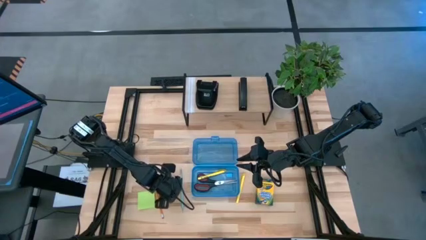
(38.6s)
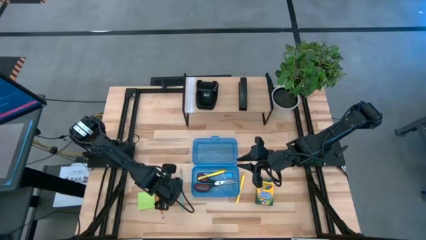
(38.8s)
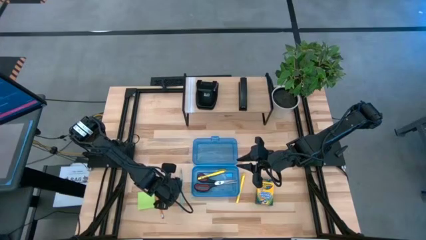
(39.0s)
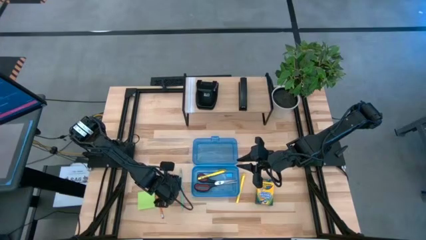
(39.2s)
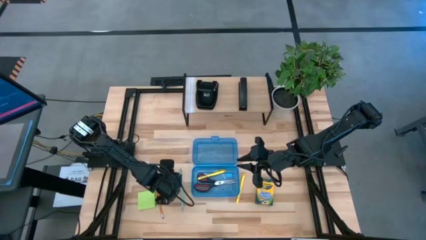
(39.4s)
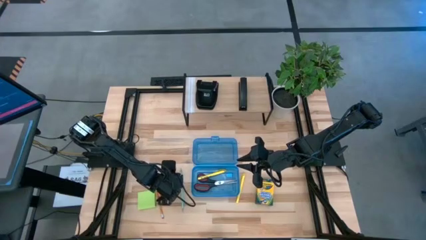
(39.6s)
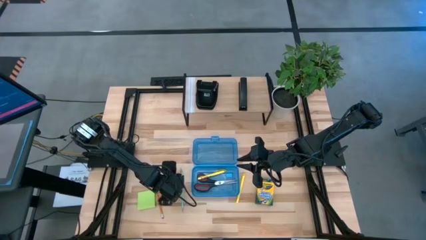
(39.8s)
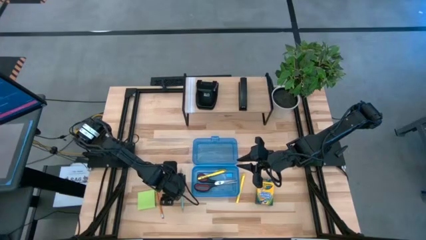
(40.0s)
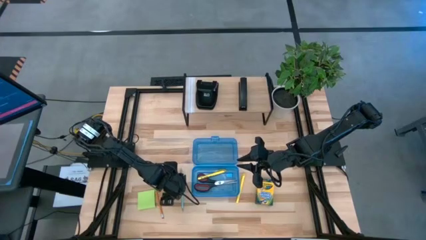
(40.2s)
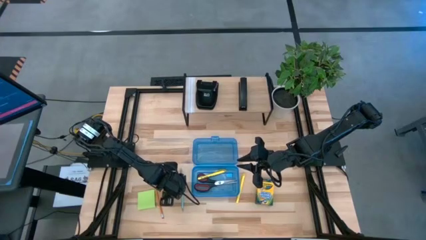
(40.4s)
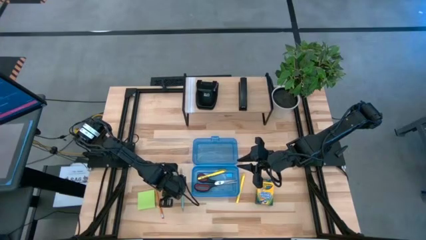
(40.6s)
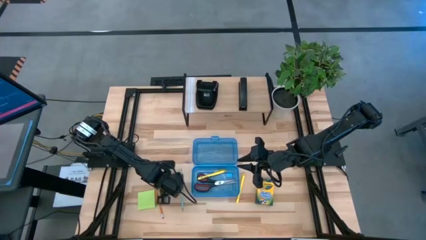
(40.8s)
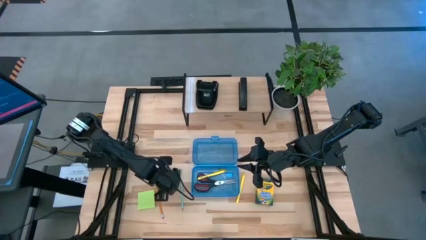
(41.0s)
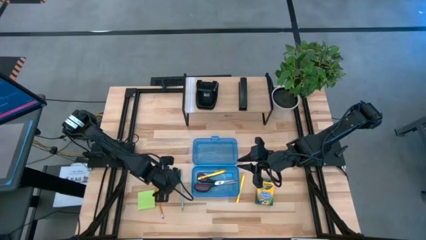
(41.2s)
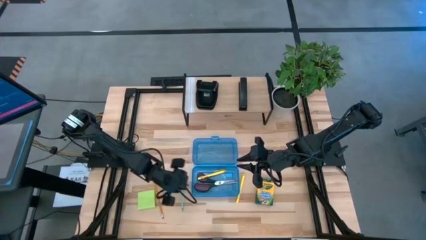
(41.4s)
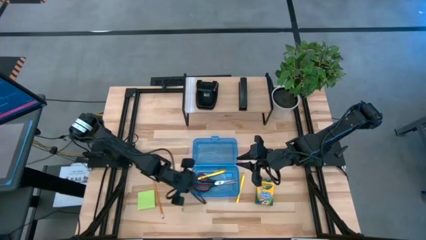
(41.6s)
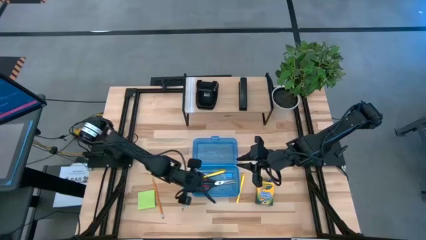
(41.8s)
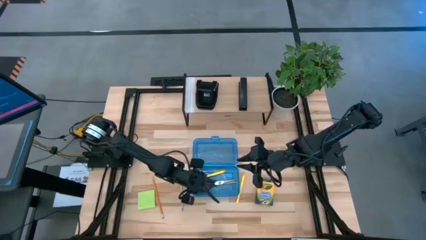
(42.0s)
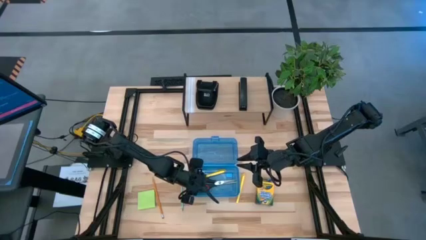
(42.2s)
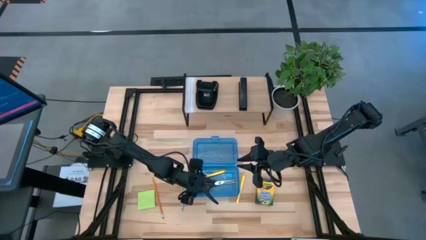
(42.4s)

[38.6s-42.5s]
Task: Pack school essentials
Put the blue eraser into the supply box

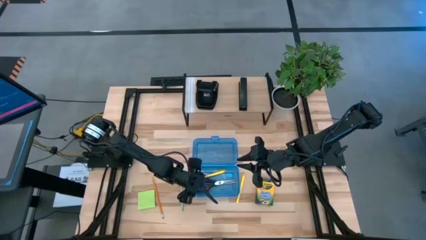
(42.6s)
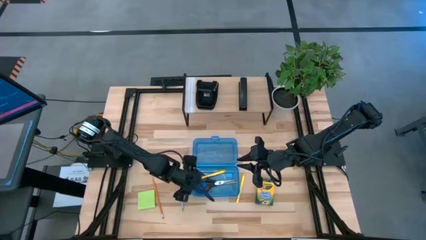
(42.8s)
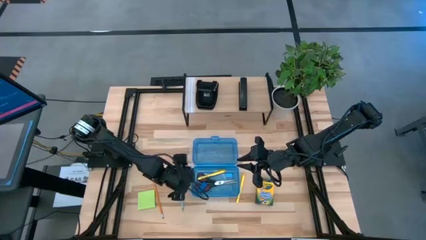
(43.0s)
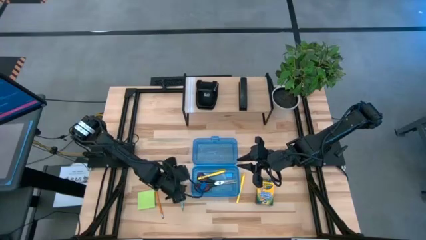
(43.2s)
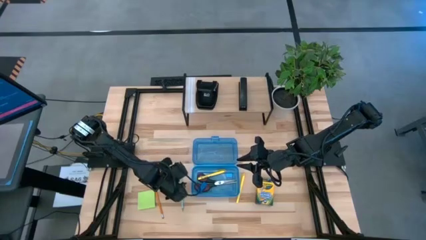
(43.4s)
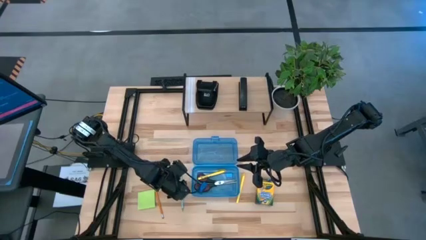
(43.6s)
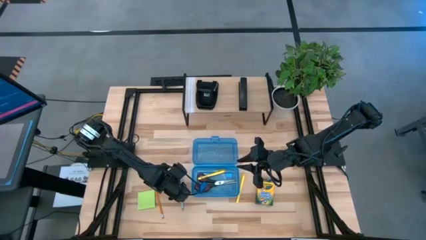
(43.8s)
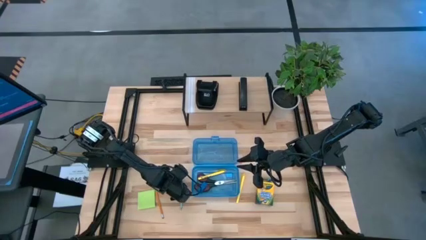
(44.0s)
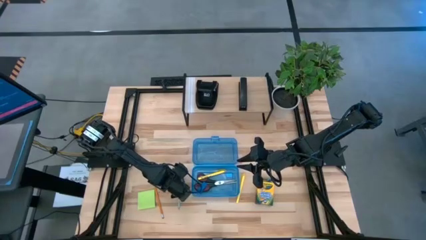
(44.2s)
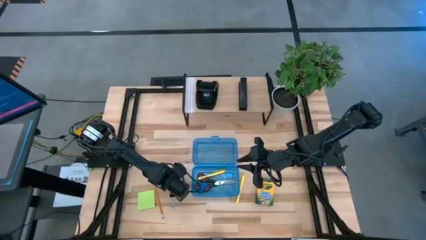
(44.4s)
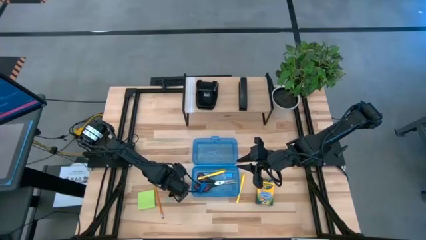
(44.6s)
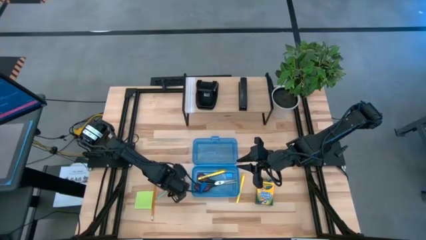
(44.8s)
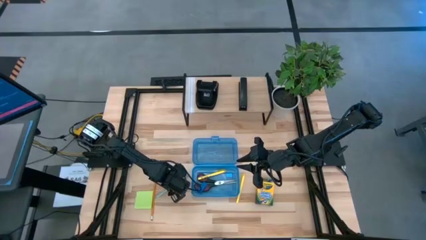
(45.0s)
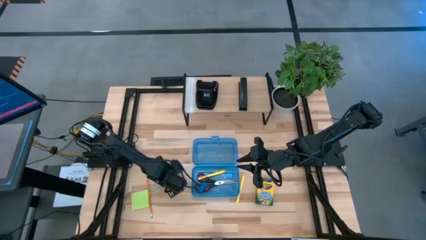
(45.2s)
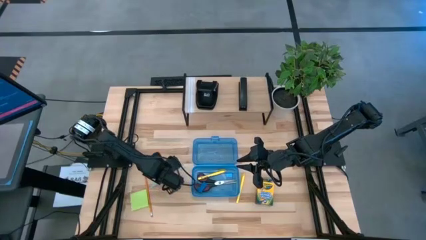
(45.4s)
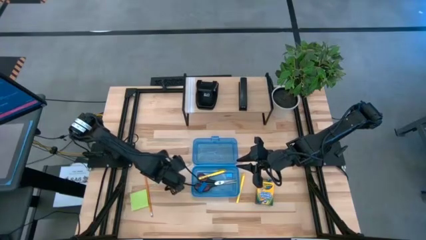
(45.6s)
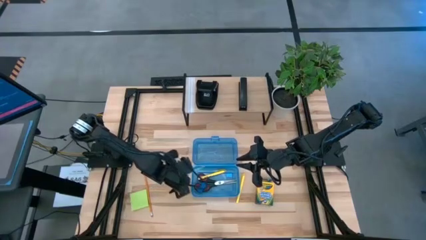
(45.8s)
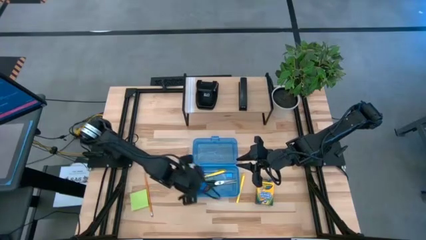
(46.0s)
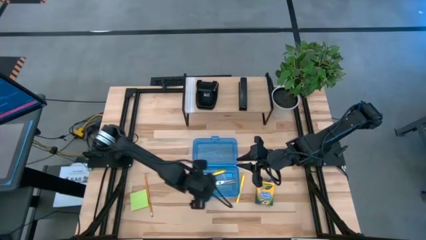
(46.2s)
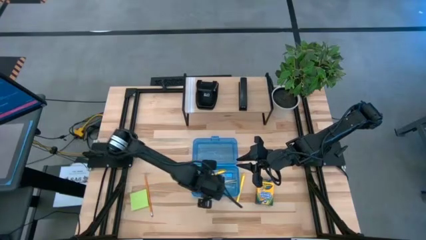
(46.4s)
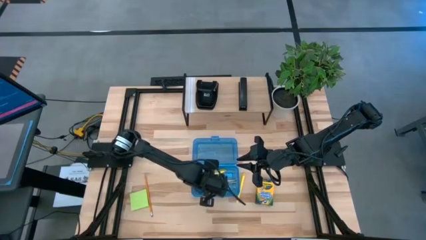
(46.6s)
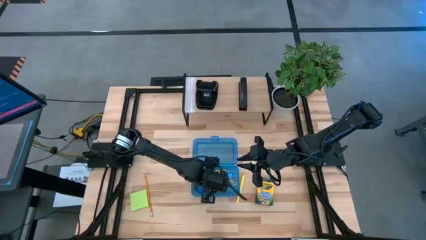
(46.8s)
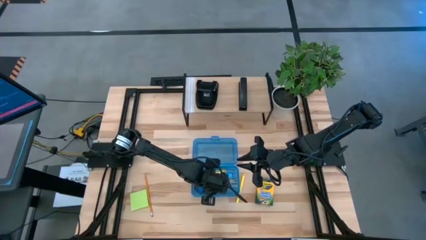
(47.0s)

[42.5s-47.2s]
Put the light blue pencil into the supply box

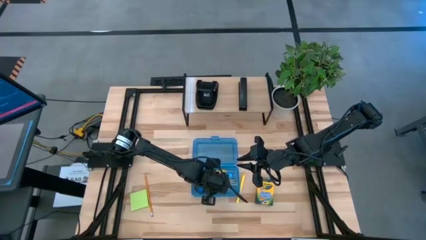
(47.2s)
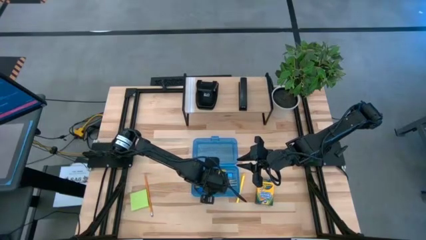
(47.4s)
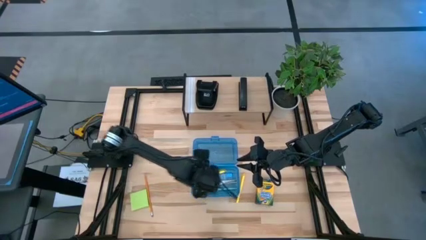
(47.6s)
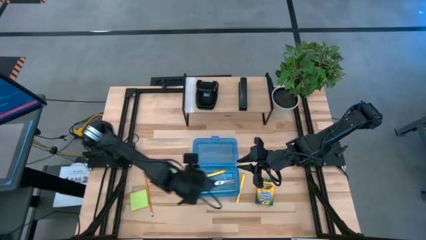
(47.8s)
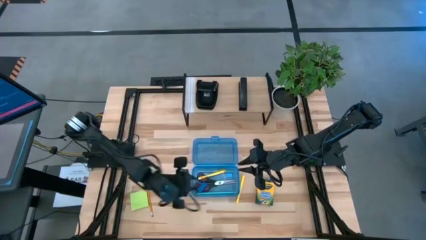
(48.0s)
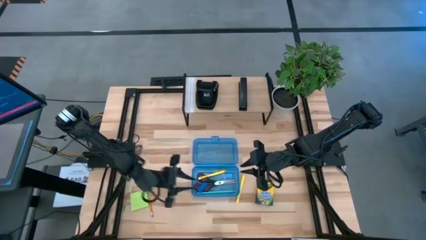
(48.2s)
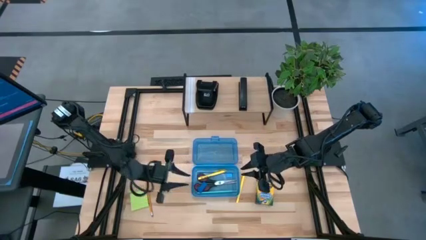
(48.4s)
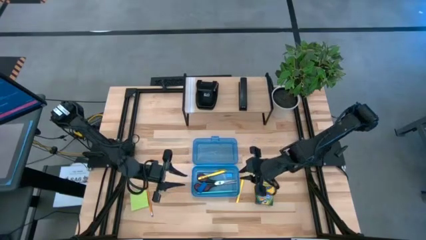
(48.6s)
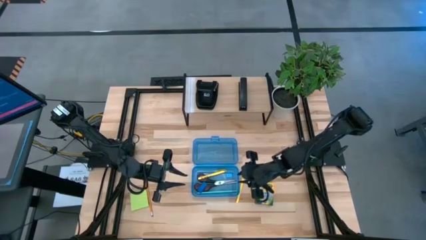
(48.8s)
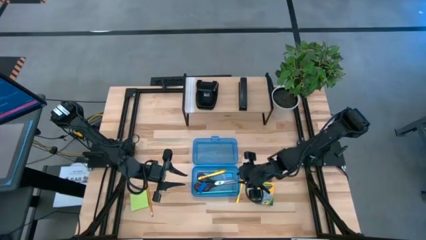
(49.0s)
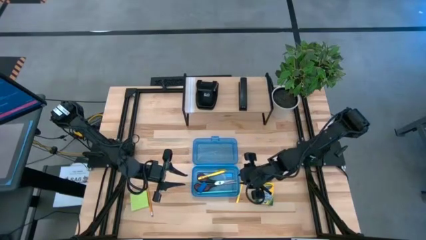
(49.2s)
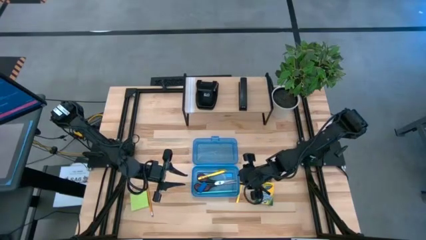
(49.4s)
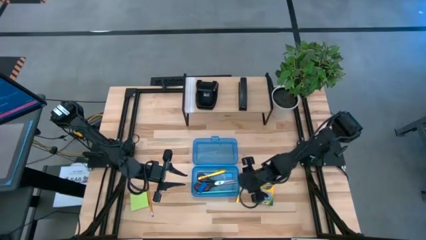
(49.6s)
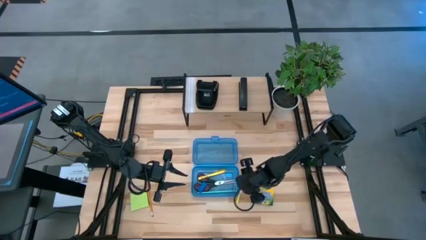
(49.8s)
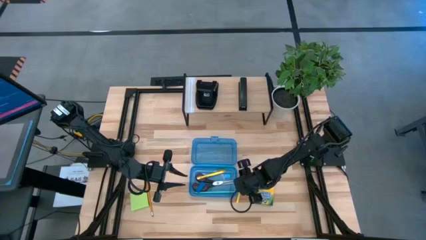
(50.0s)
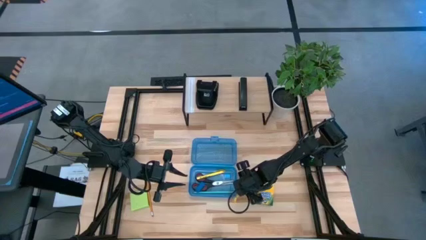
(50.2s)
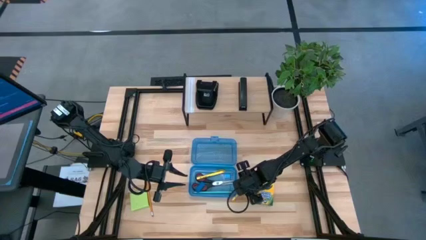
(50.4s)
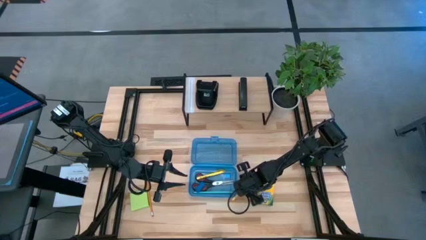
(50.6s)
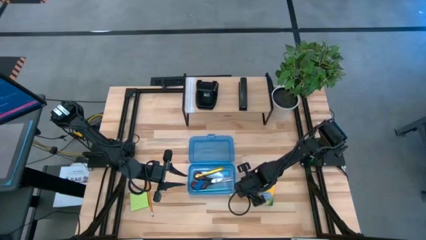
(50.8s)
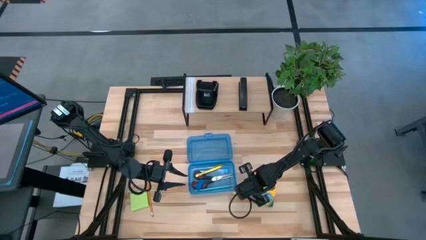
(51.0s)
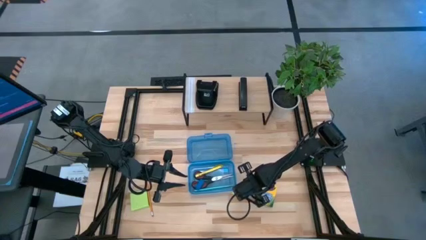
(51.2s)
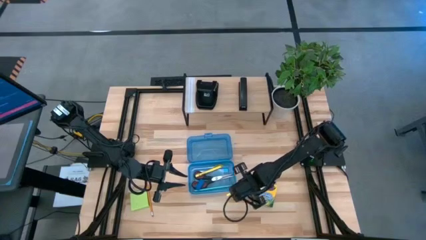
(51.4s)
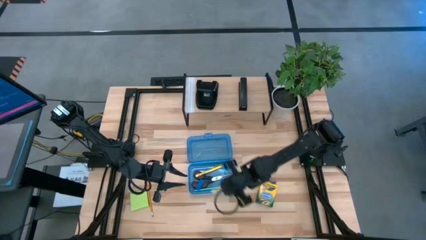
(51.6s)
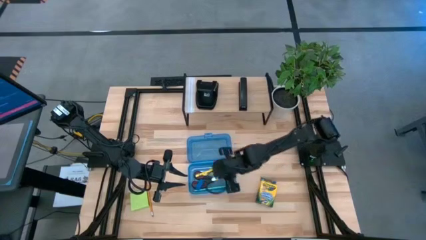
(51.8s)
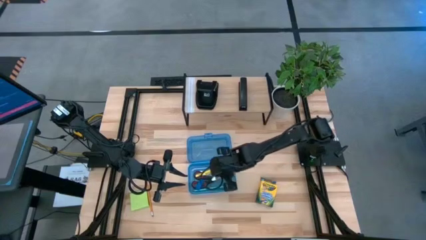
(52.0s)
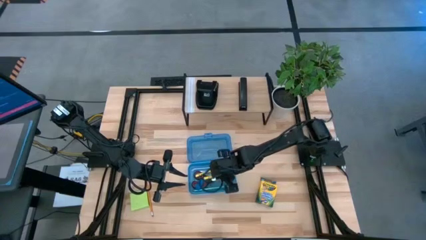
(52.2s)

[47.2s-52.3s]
Put the yellow pen into the supply box

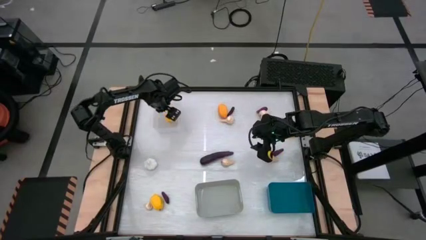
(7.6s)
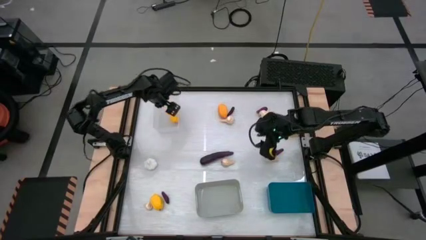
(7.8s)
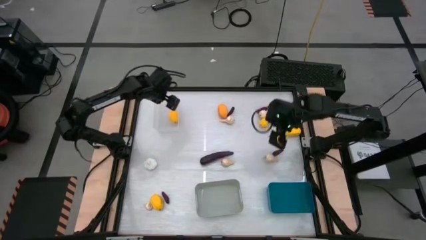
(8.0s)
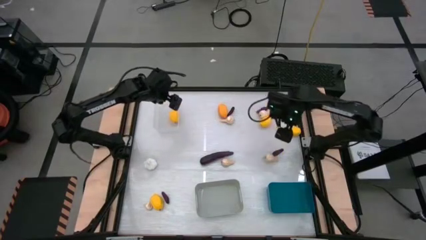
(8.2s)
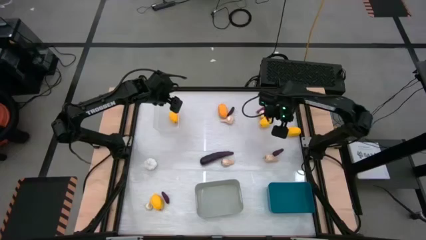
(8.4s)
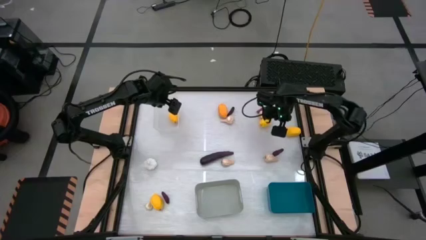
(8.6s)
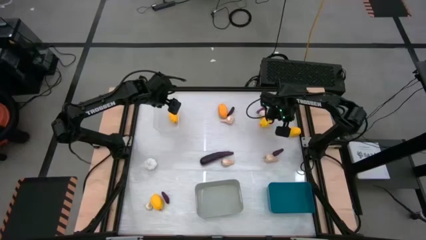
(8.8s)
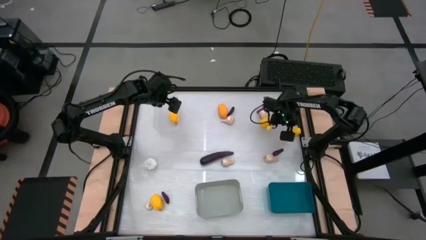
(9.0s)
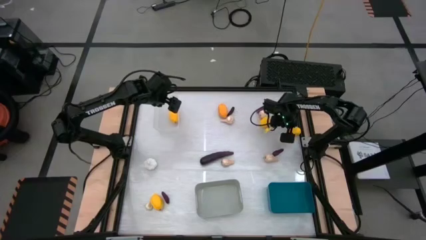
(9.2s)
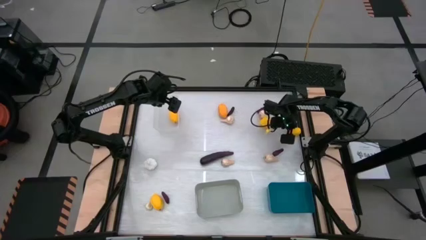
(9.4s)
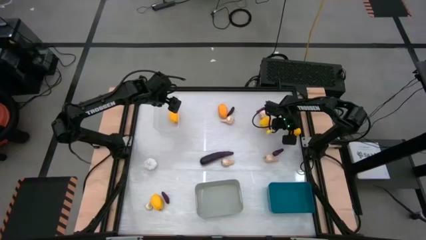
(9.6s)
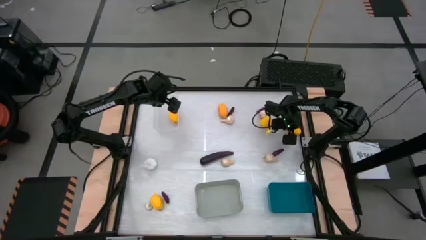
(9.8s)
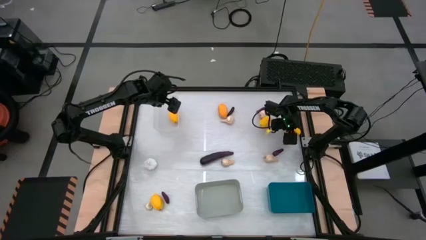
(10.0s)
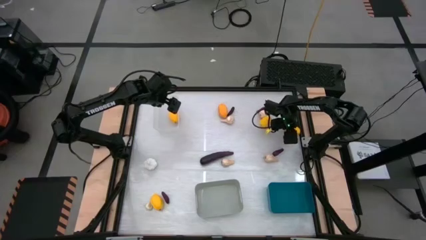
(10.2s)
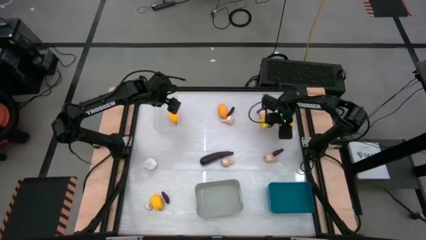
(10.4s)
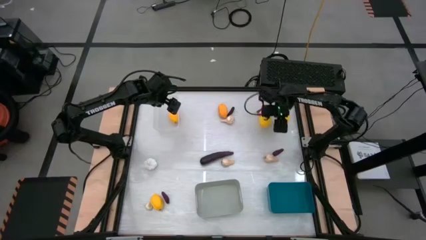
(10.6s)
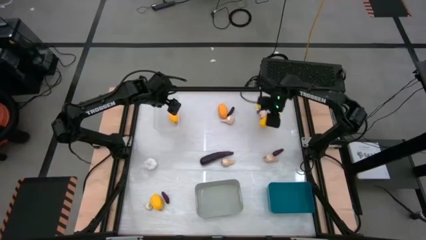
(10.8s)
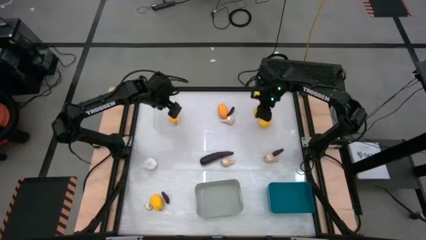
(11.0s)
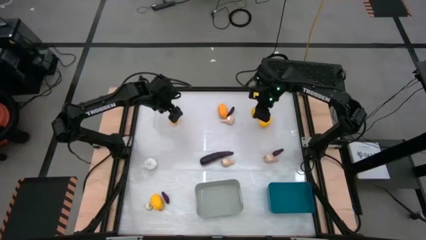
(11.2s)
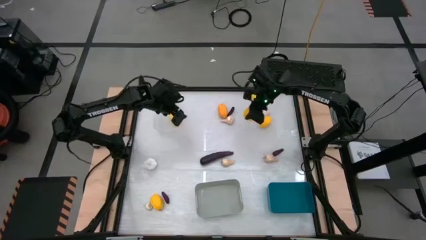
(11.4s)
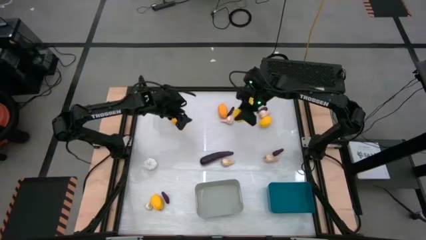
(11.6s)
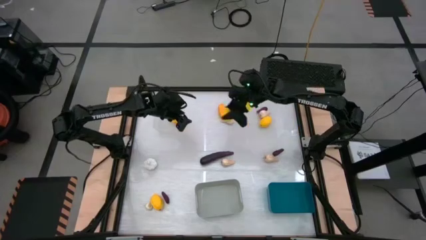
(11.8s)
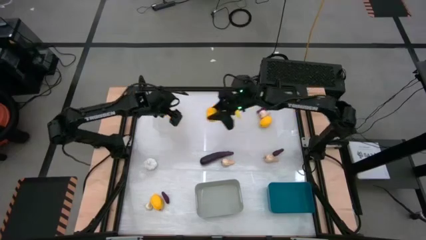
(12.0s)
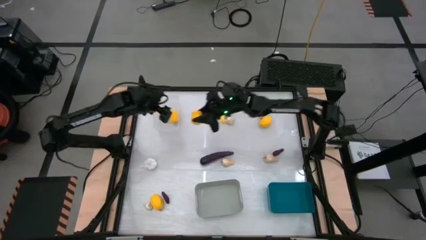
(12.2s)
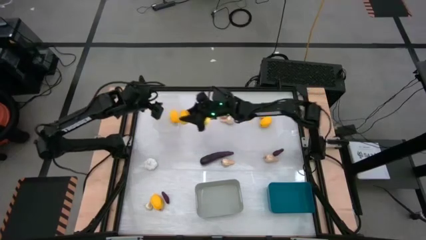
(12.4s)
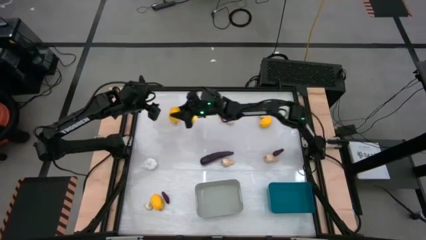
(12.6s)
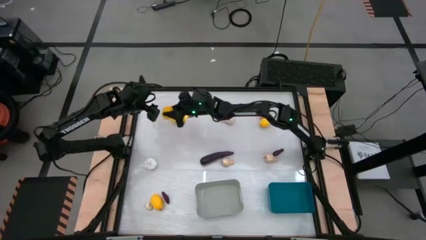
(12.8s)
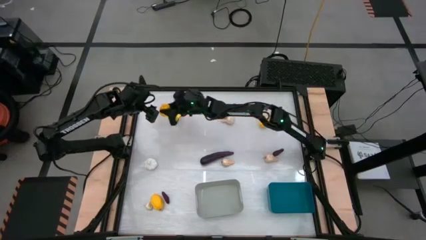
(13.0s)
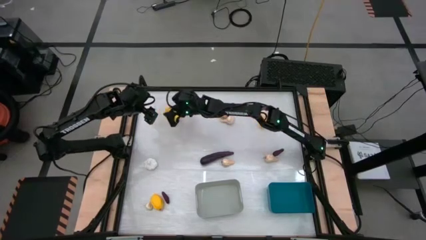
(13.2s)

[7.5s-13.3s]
Task: Sort produce into baskets
Put the lemon into the transparent bin
